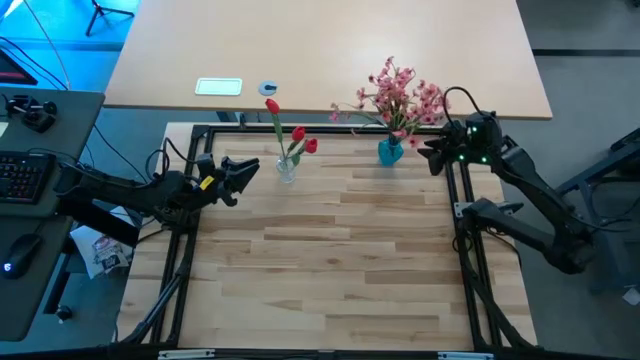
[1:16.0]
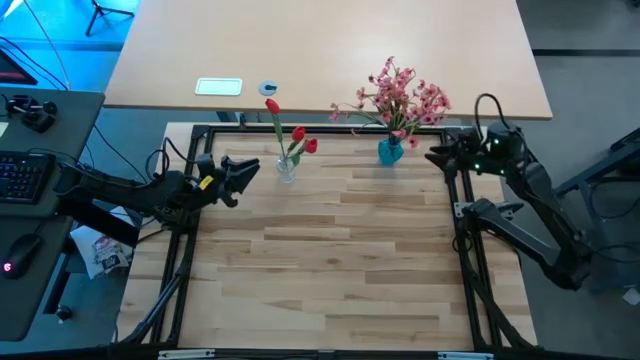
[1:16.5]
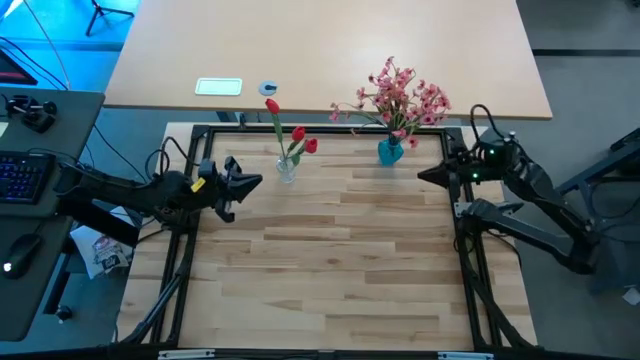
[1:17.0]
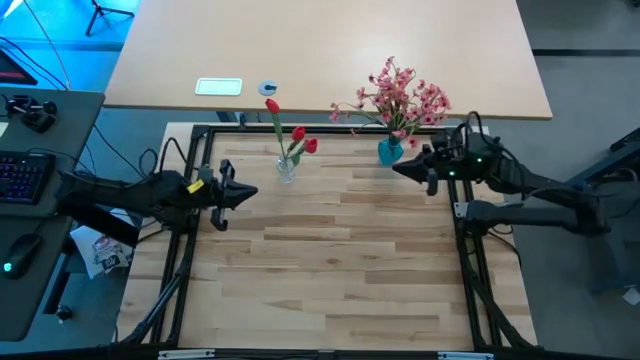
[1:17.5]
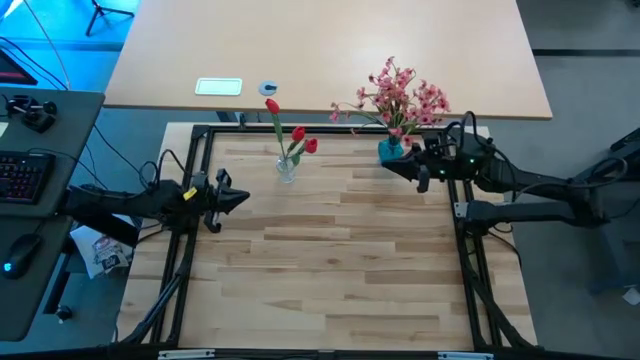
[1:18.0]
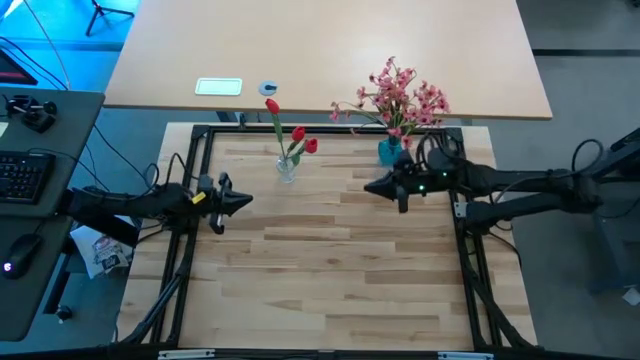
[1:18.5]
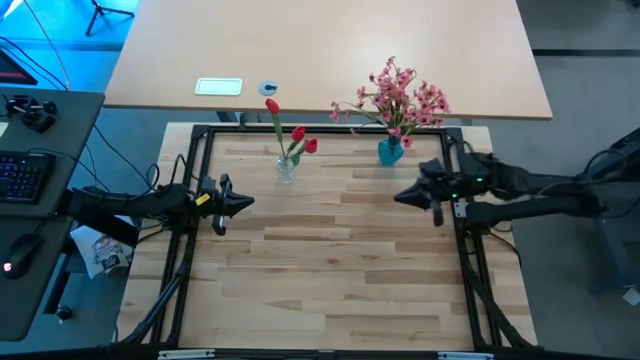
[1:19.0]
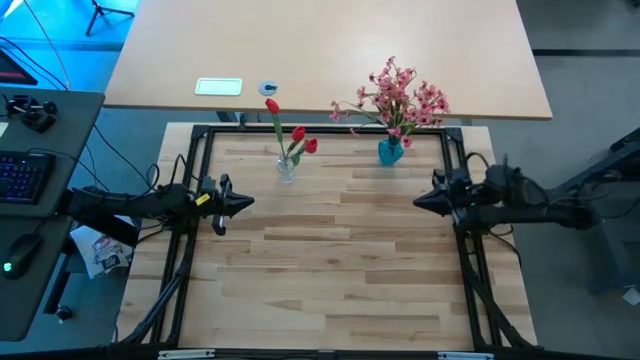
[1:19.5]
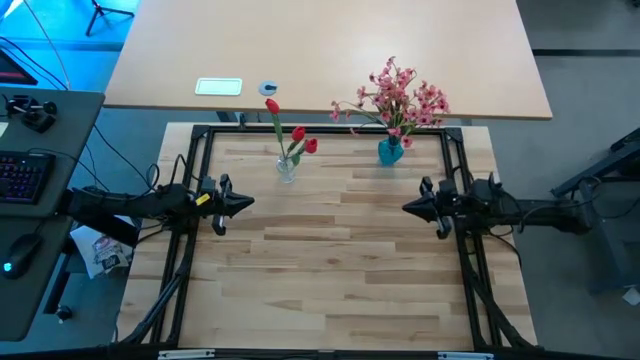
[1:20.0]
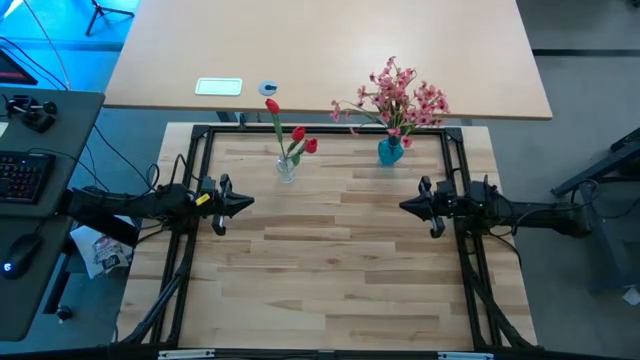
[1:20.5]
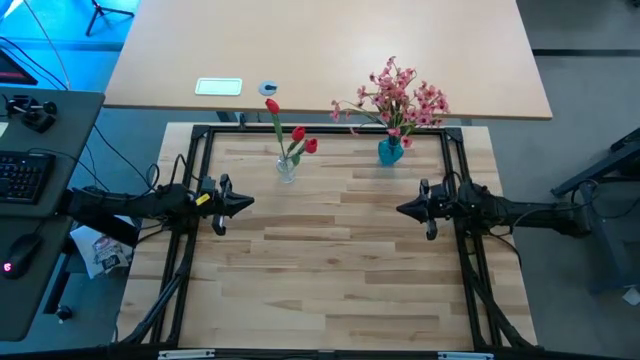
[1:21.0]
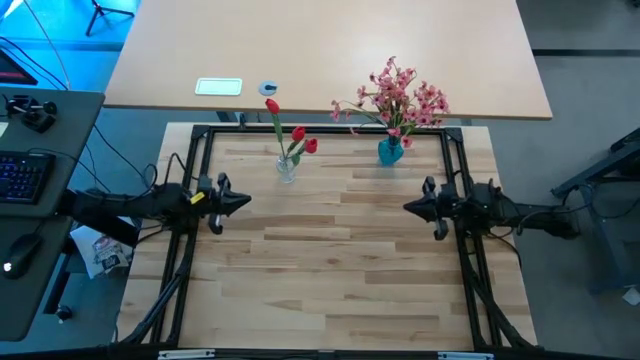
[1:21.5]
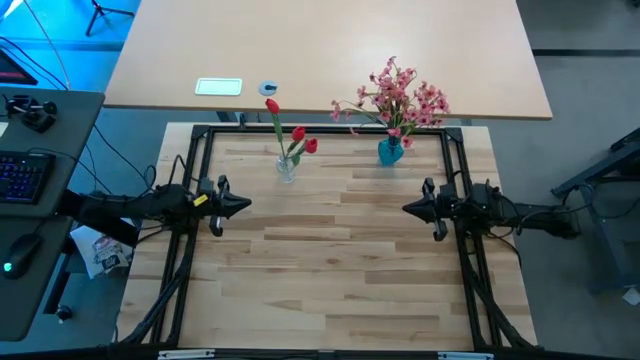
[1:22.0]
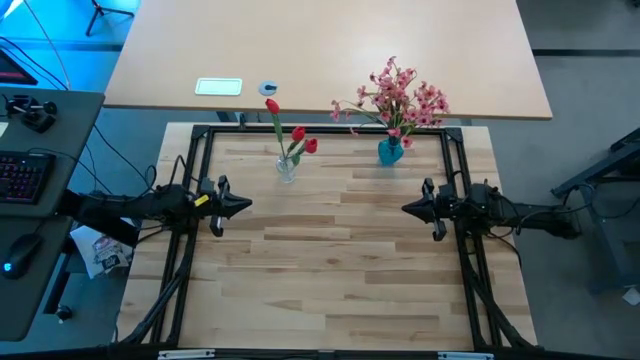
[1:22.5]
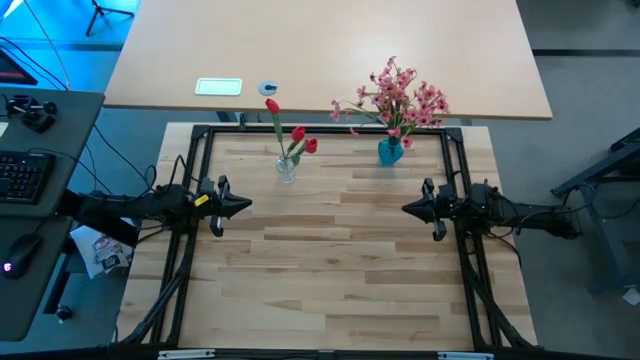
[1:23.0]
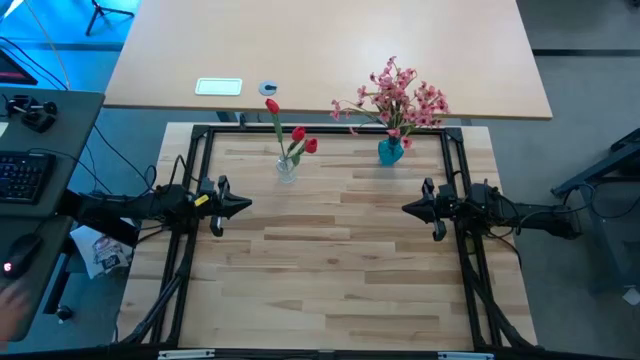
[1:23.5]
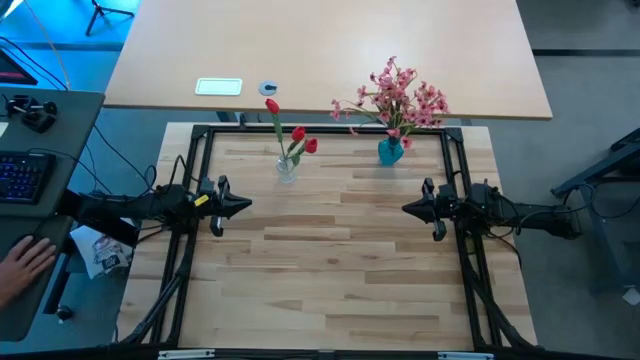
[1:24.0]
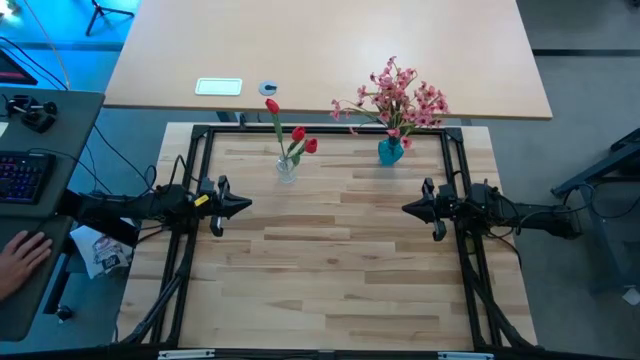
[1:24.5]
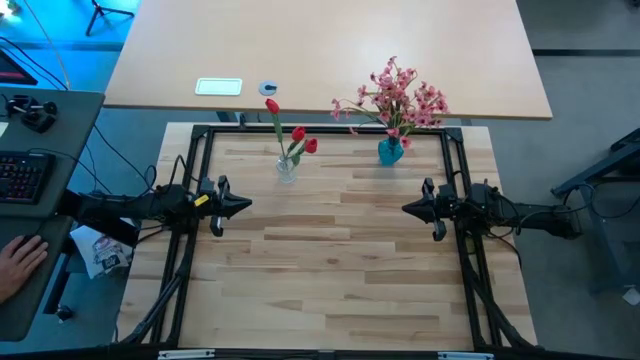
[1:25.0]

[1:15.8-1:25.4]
Task: Sort flowers into vase by color
Return to Home Position

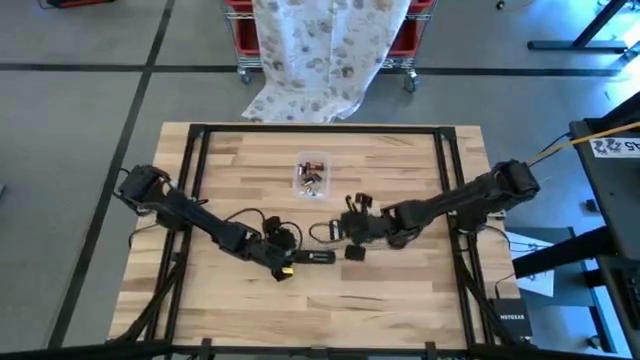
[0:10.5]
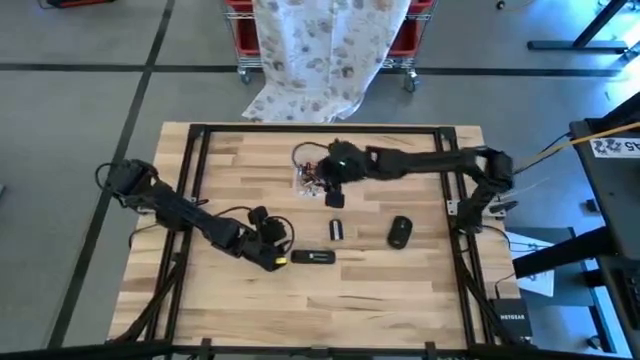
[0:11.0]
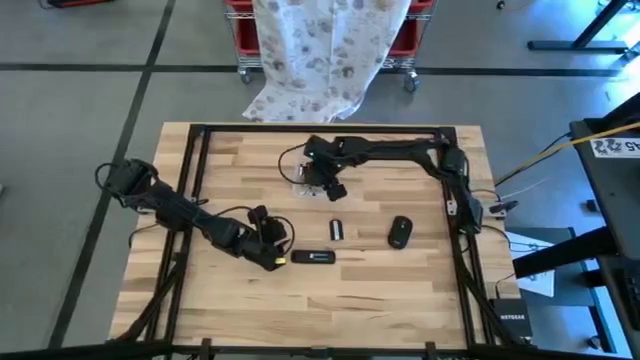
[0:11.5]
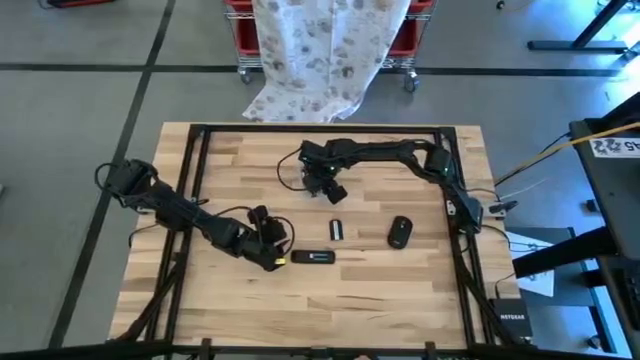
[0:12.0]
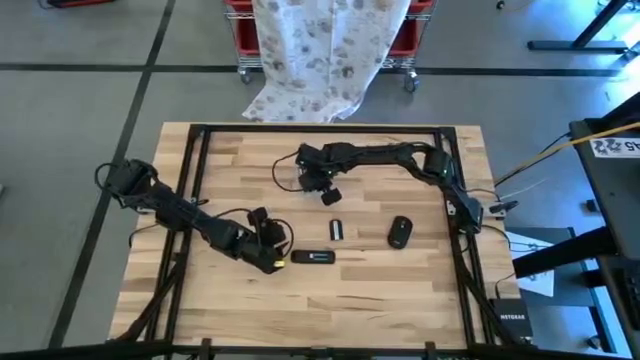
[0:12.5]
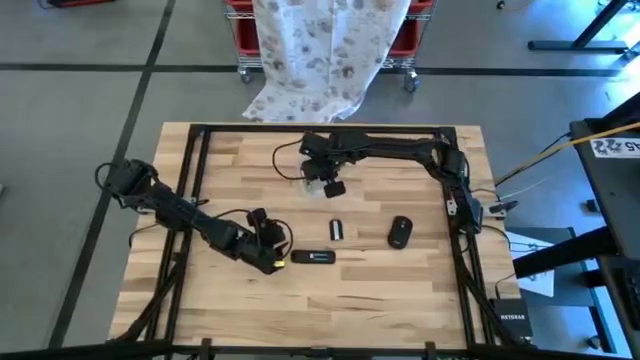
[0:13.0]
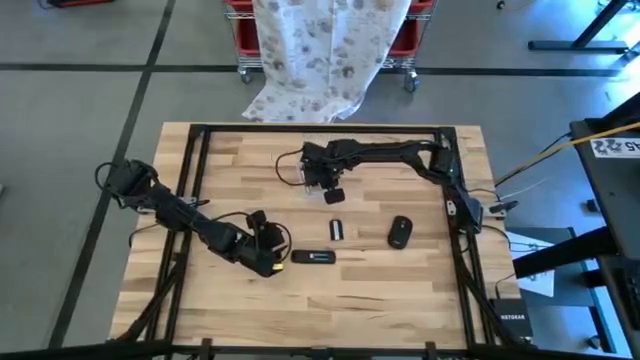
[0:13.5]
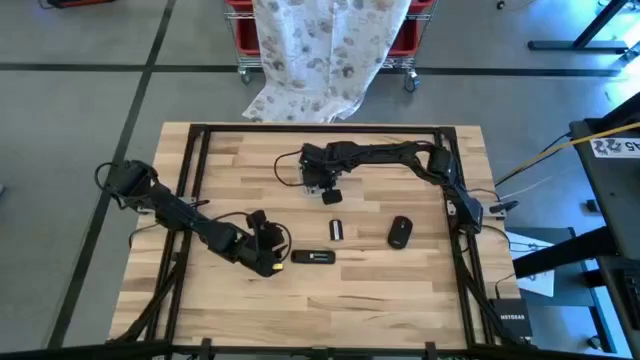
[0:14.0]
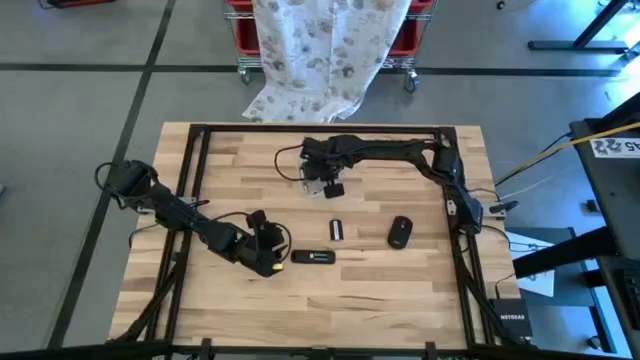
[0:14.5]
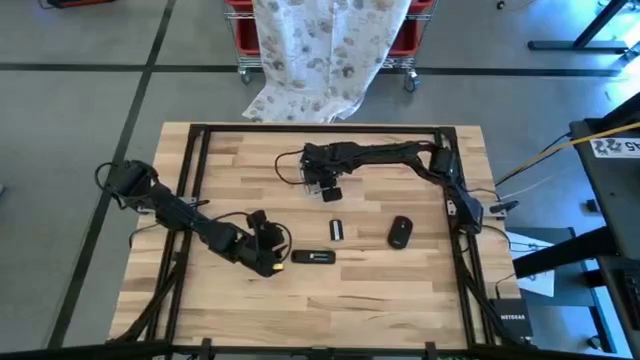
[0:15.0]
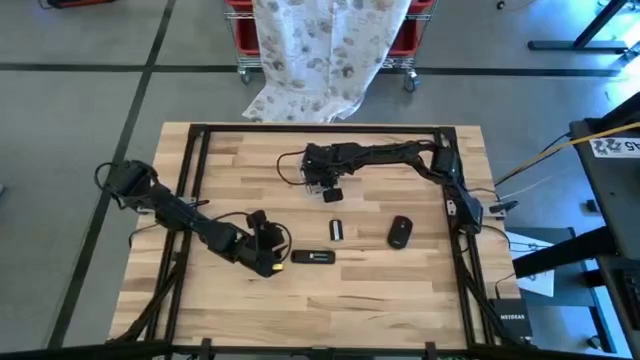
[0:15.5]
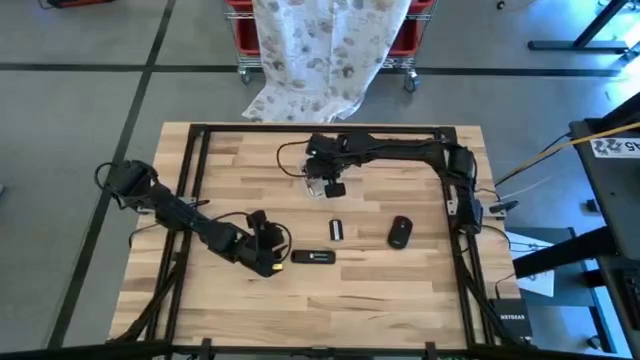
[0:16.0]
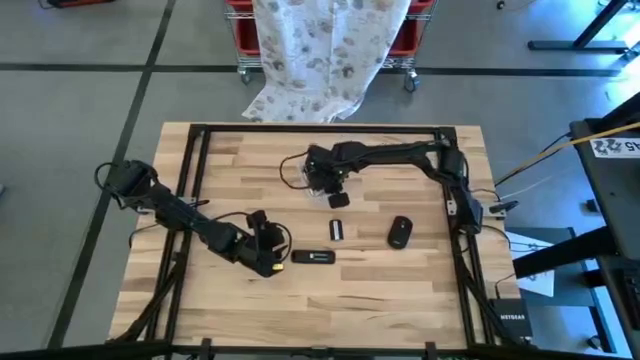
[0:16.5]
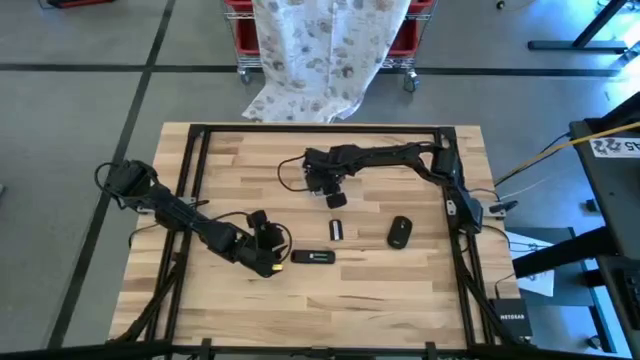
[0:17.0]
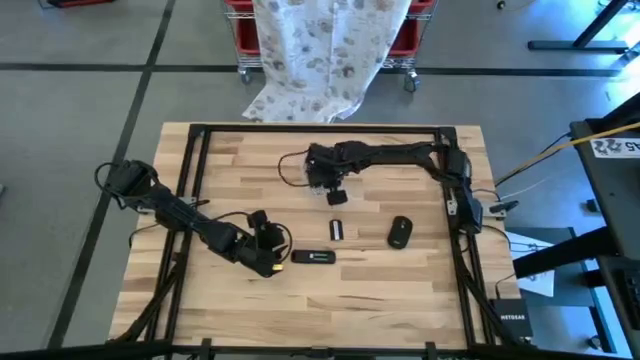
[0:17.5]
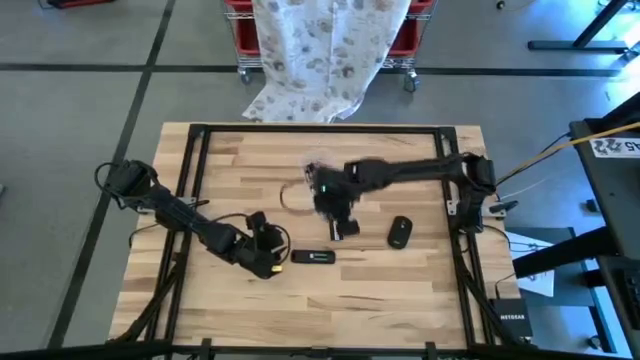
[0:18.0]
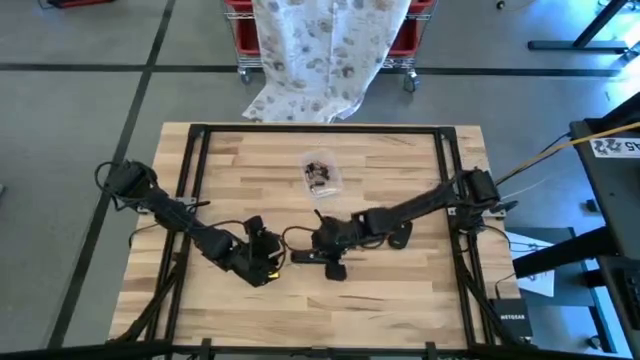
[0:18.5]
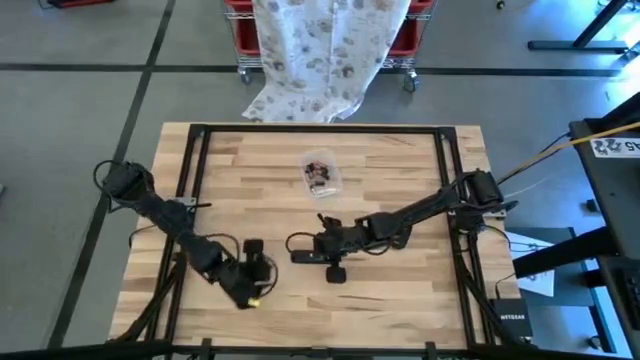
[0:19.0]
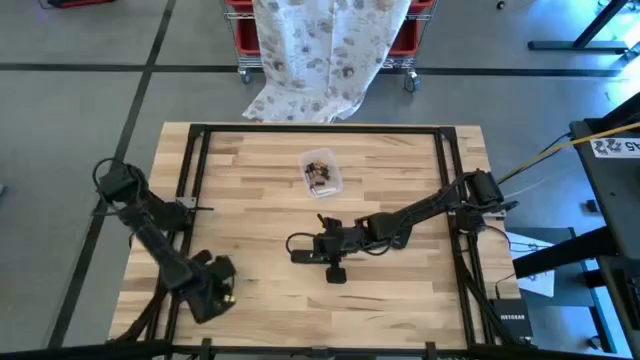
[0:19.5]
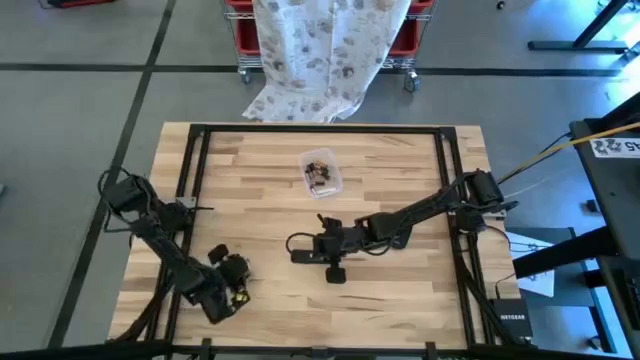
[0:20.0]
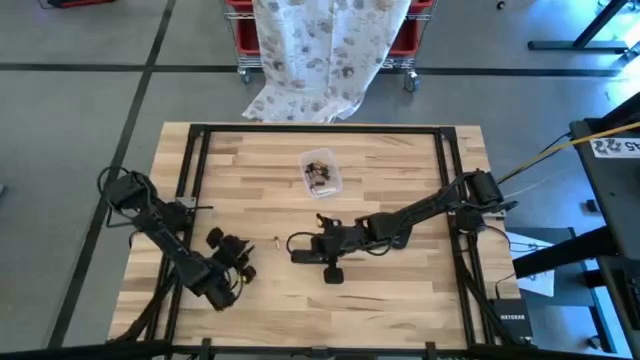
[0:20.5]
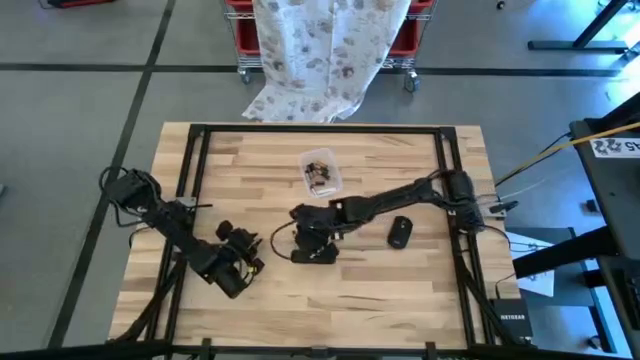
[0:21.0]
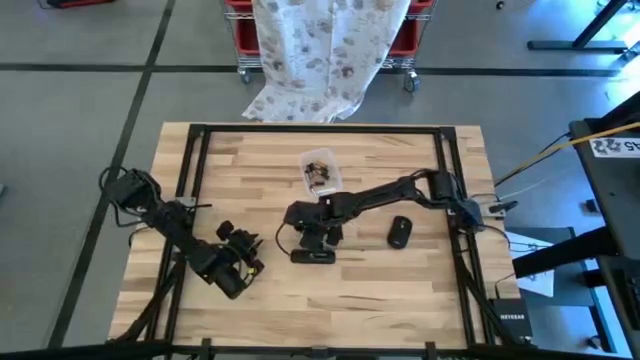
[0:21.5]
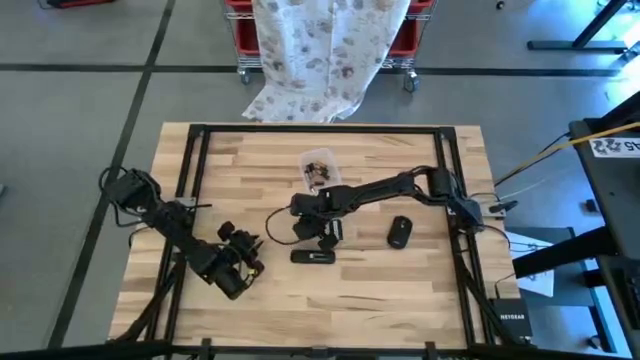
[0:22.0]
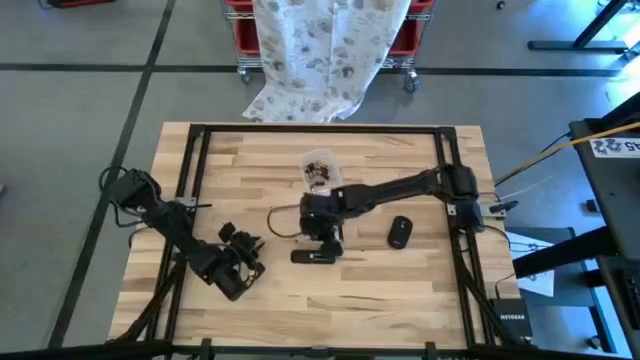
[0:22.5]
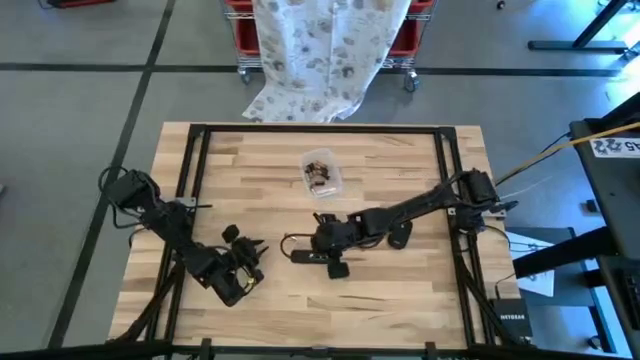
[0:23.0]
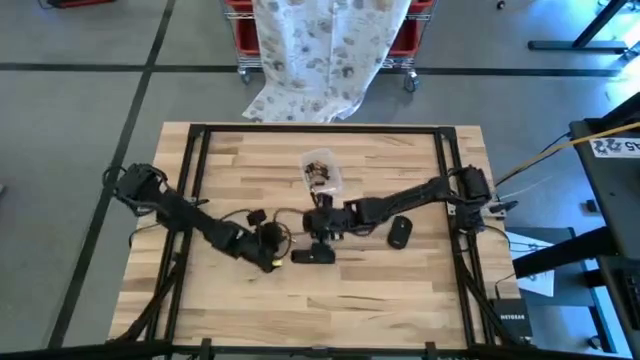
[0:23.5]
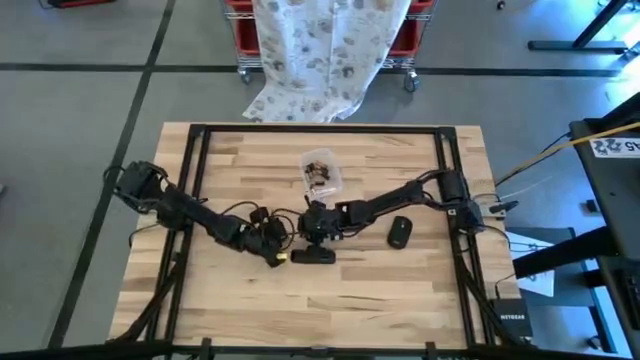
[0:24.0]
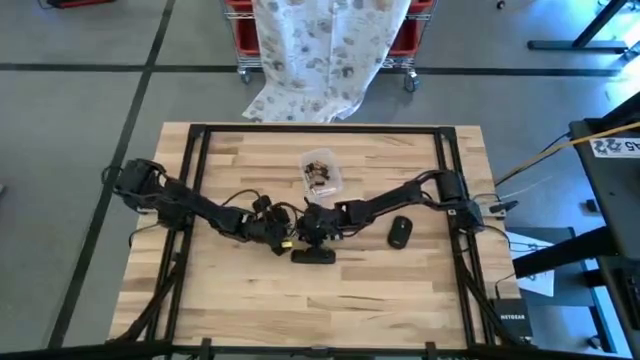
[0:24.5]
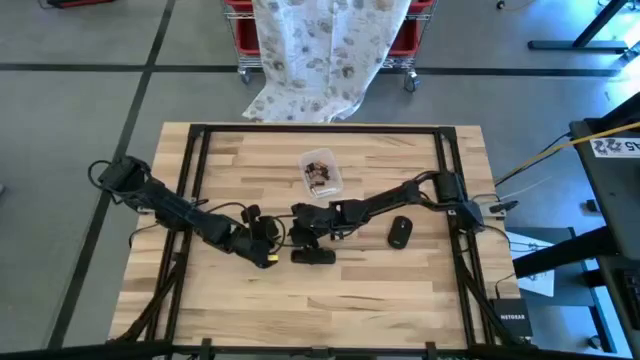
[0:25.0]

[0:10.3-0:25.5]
Task: Insert battery
Insert the white battery into the remote control
